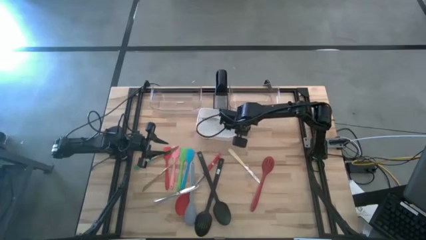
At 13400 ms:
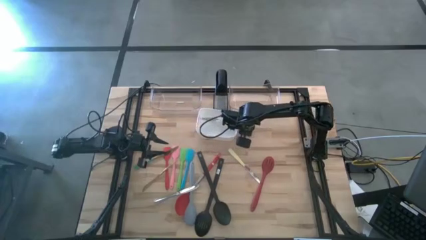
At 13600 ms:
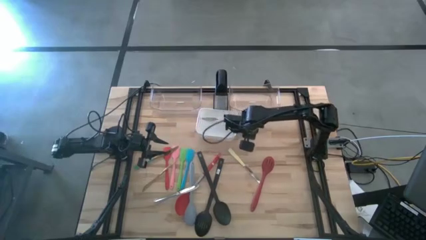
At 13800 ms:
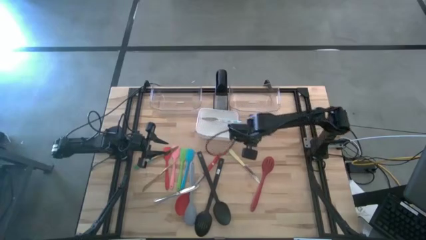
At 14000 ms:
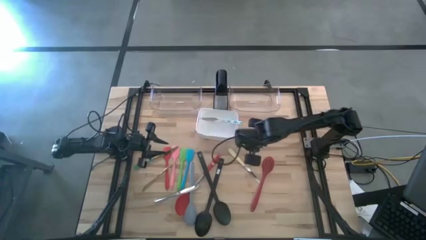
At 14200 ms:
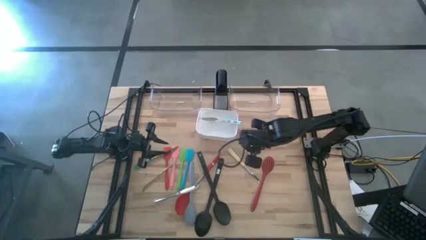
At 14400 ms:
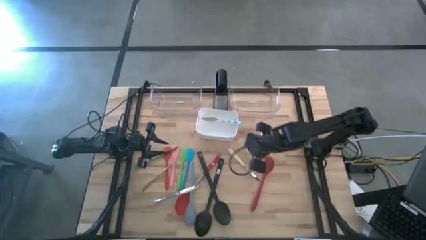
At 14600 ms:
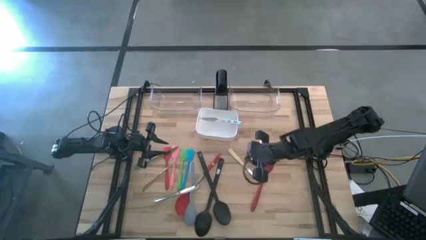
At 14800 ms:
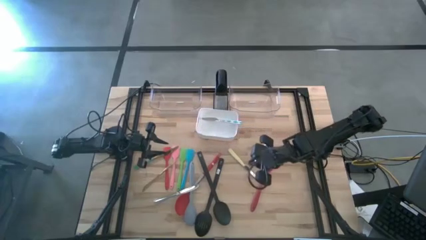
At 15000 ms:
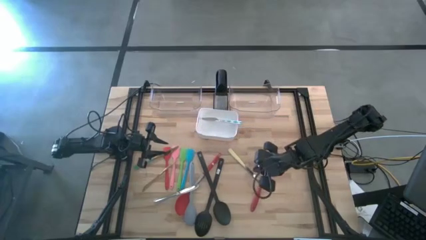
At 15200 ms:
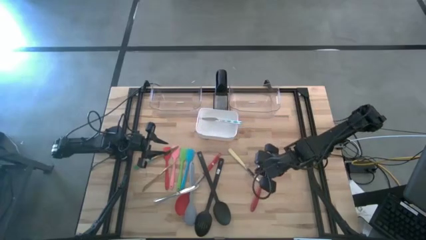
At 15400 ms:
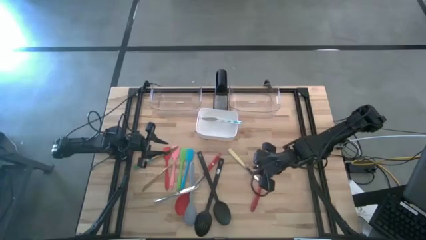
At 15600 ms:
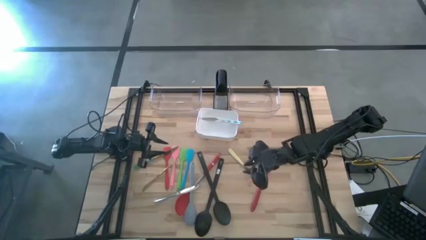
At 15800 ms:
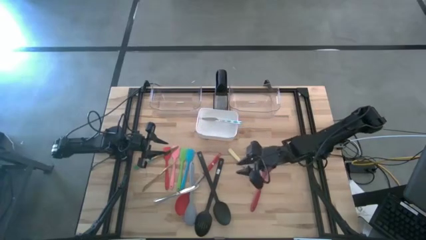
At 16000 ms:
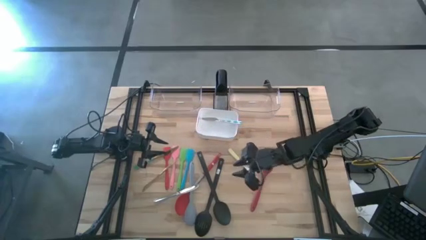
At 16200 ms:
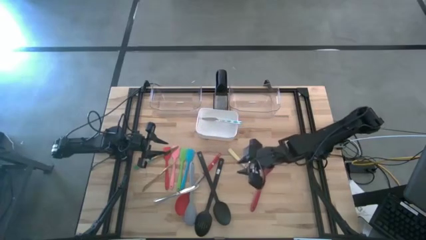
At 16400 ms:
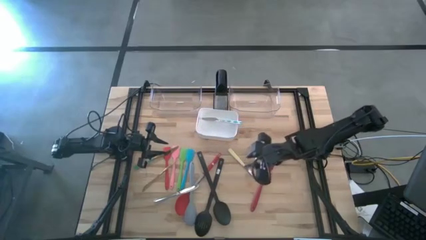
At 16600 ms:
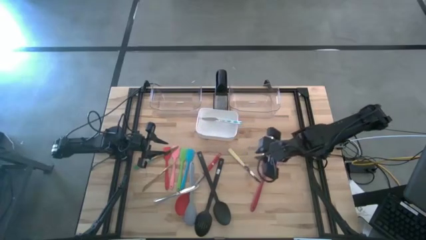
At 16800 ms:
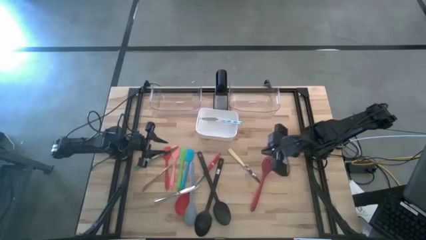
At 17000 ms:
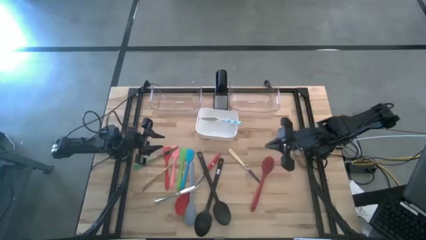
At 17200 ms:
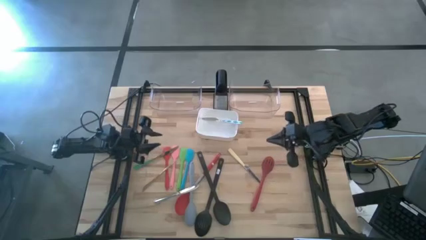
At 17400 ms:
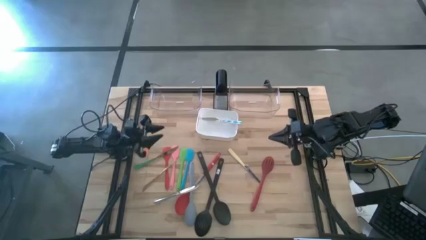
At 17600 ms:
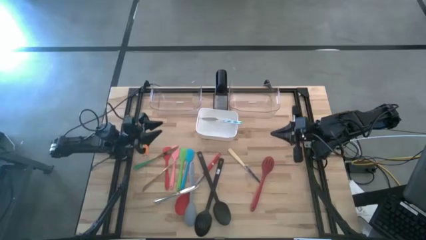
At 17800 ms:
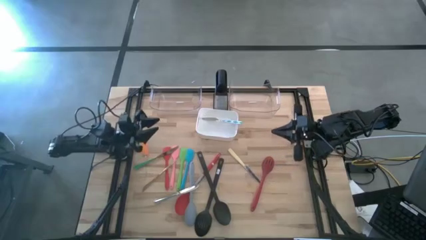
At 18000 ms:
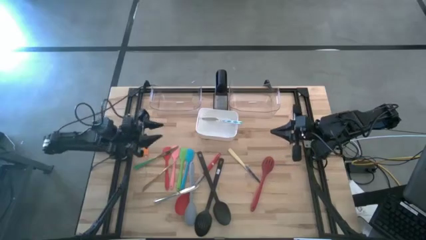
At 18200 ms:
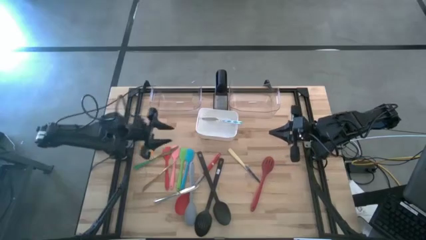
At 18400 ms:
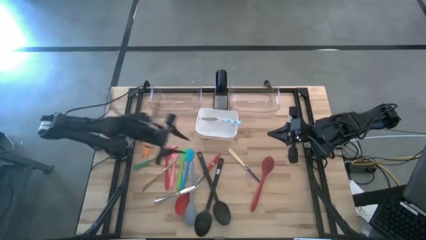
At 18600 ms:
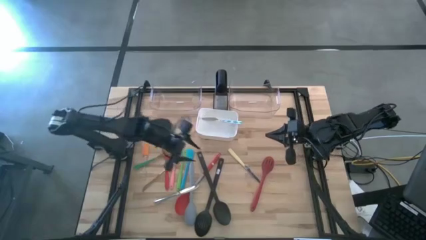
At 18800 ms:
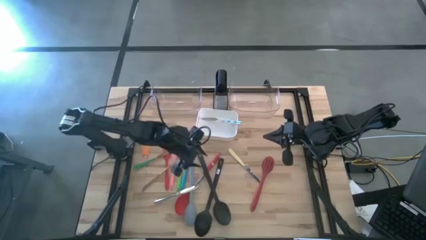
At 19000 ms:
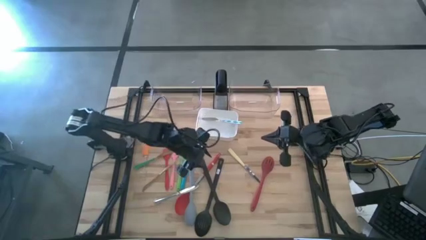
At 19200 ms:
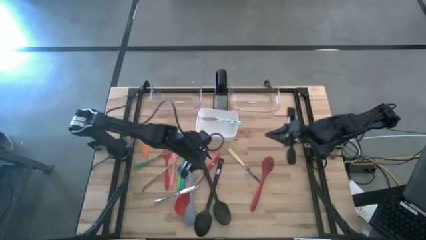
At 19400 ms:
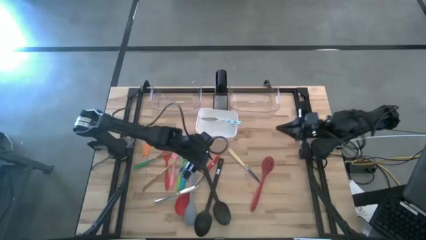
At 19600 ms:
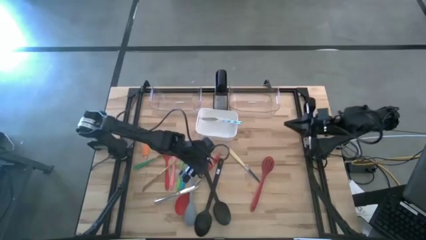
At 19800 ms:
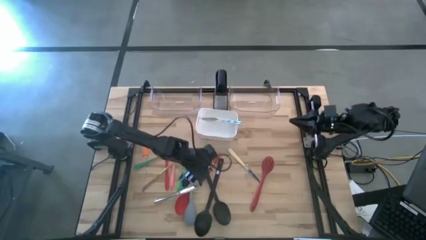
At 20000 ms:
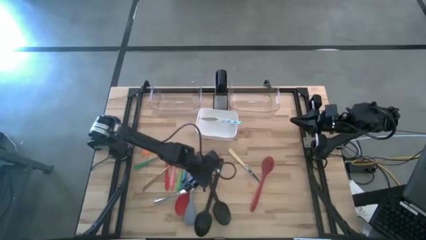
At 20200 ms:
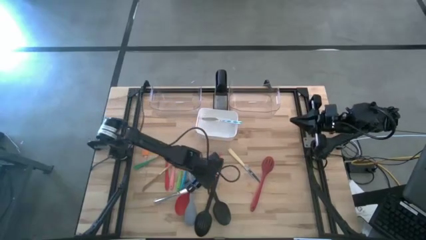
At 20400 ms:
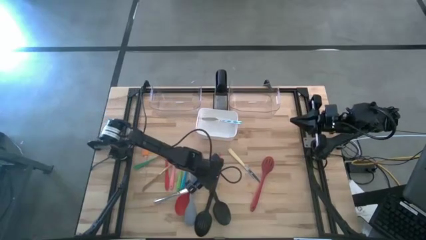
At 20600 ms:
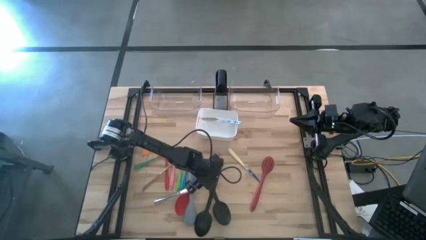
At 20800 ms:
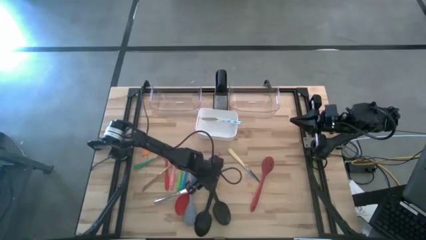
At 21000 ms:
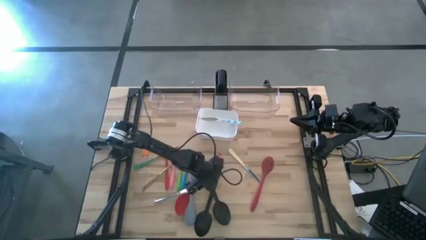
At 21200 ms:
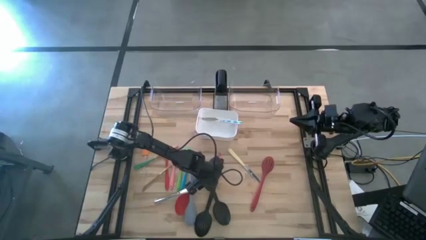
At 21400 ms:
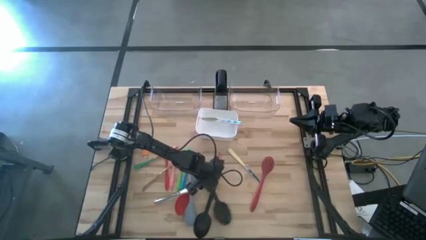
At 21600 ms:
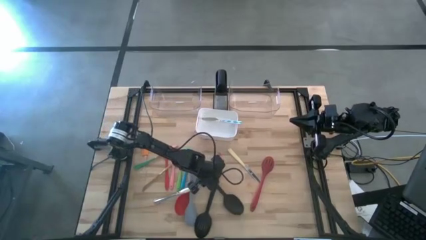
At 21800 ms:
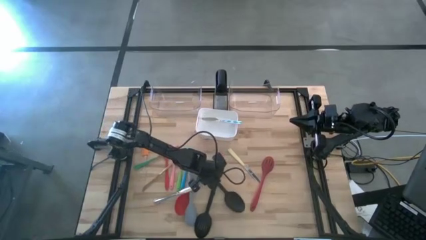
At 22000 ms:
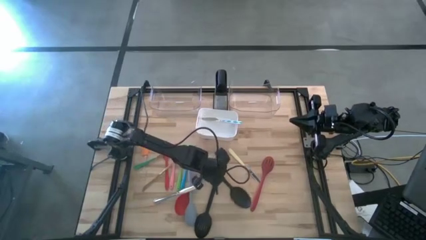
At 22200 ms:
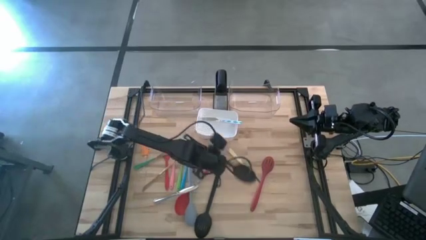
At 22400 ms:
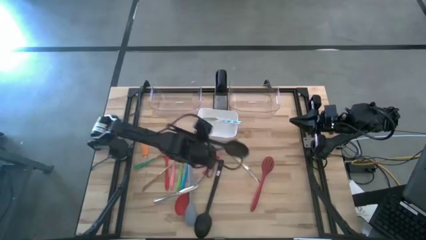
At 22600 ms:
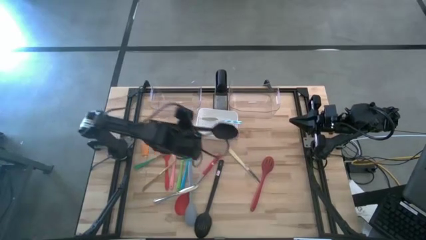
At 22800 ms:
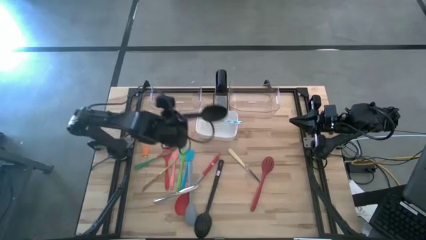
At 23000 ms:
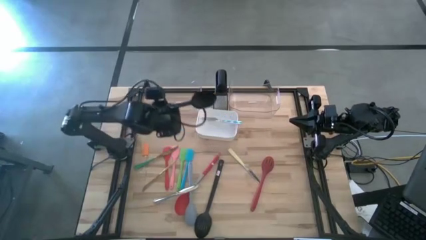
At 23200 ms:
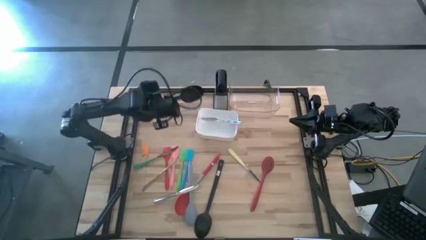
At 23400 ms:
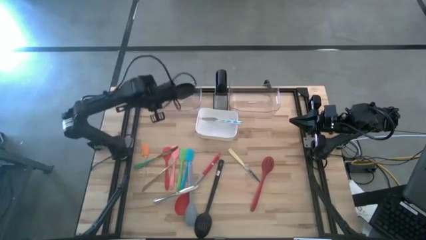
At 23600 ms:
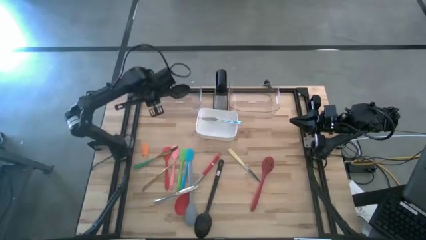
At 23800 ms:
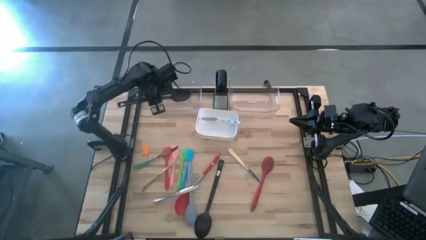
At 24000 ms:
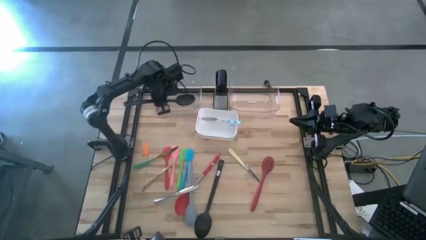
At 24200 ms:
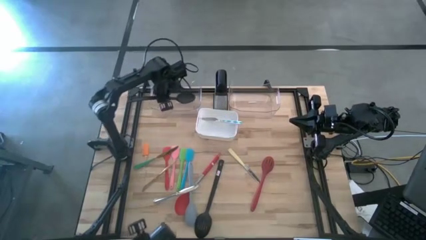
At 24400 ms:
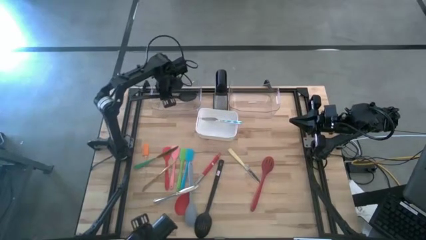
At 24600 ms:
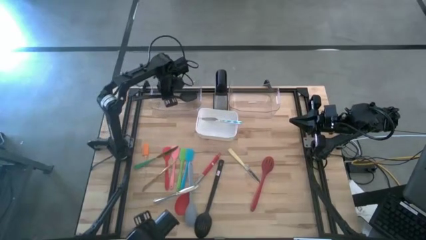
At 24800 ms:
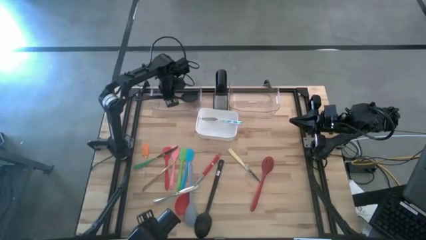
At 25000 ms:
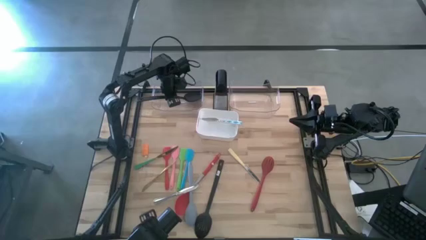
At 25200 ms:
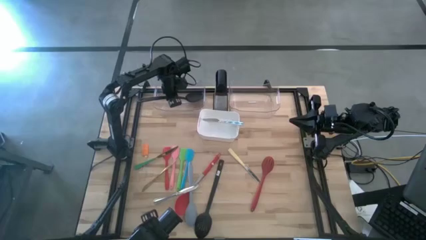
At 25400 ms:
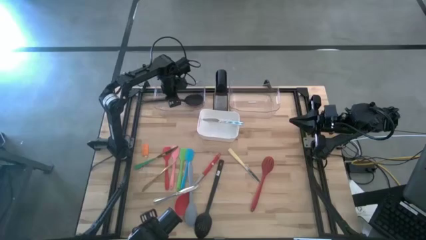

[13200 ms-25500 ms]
Task: Pick & Place Kitchen Items
Put the black serving spoon into the left transparent bin

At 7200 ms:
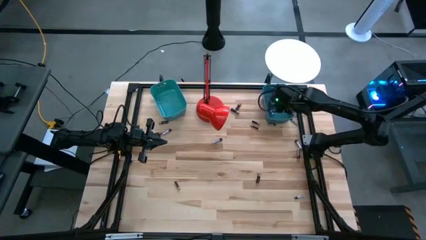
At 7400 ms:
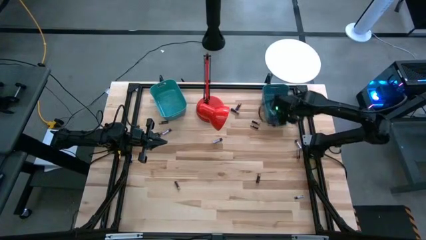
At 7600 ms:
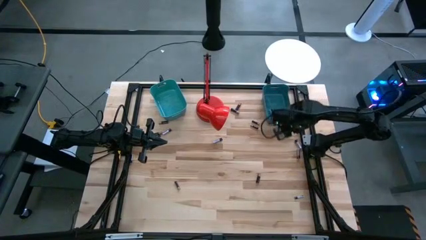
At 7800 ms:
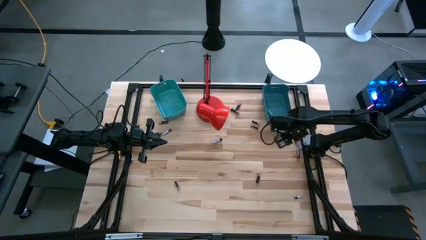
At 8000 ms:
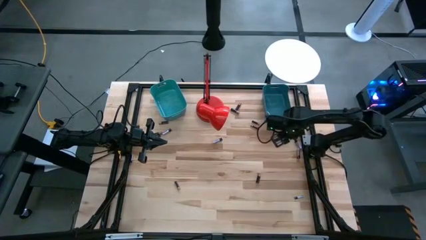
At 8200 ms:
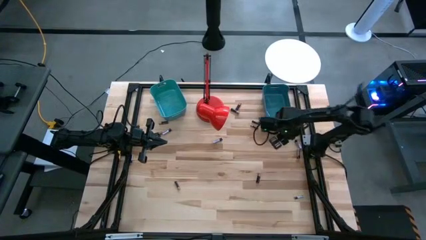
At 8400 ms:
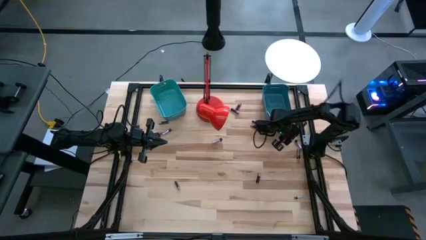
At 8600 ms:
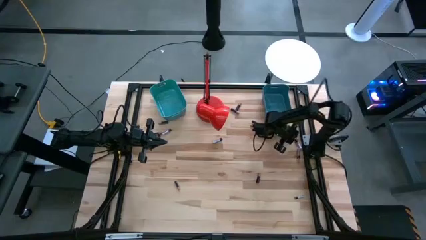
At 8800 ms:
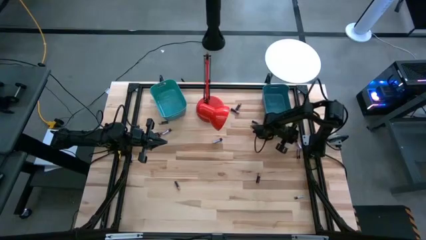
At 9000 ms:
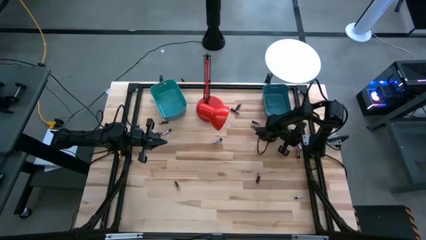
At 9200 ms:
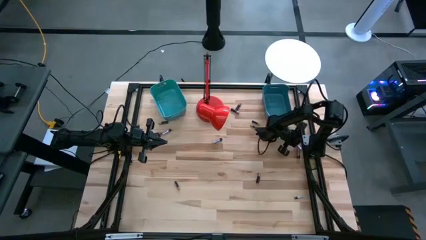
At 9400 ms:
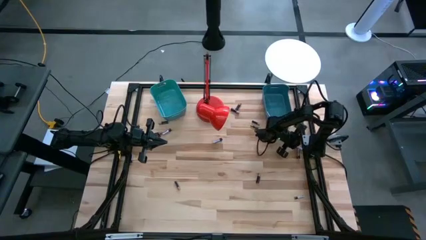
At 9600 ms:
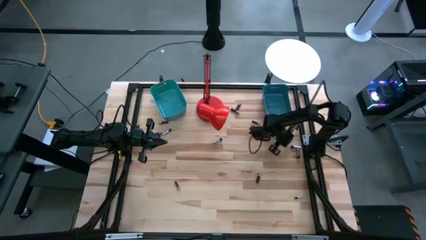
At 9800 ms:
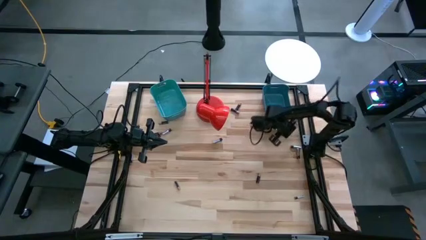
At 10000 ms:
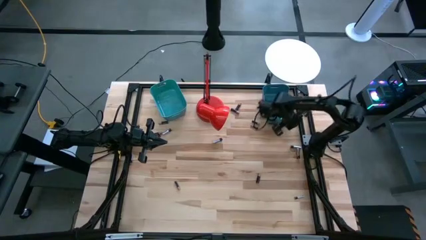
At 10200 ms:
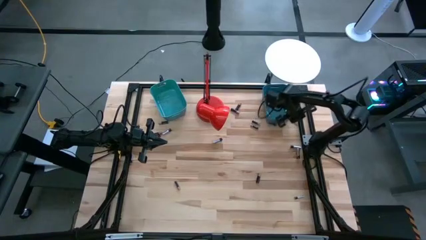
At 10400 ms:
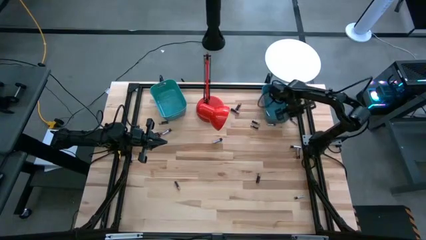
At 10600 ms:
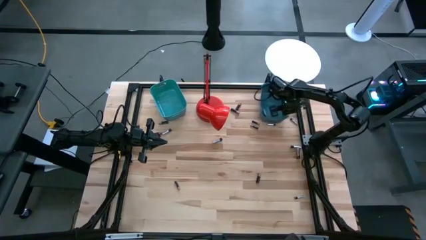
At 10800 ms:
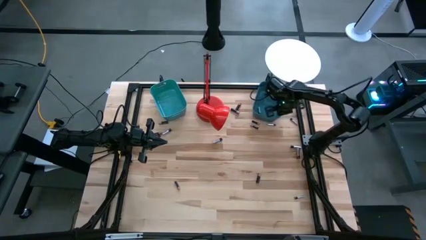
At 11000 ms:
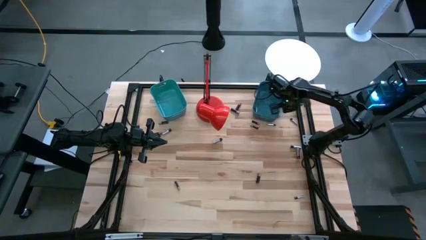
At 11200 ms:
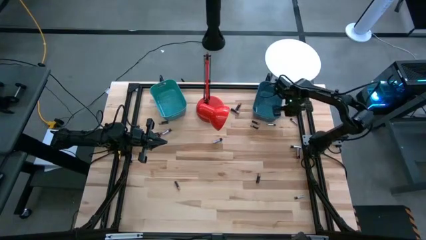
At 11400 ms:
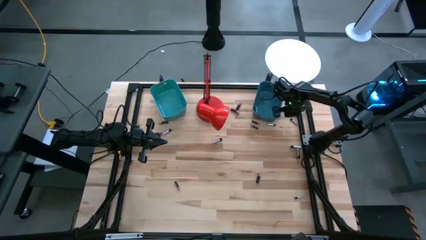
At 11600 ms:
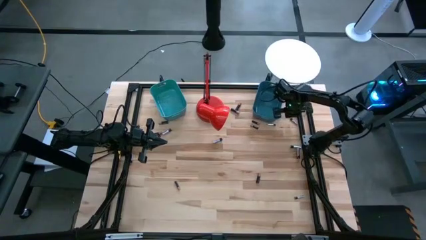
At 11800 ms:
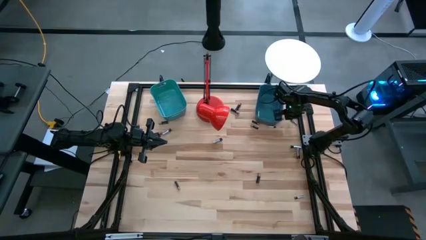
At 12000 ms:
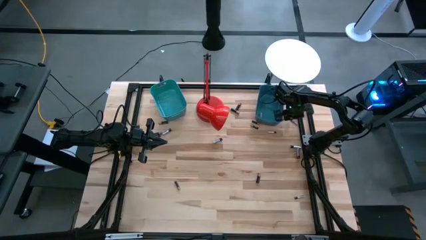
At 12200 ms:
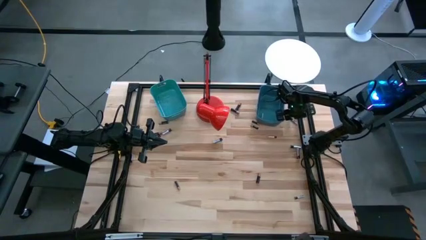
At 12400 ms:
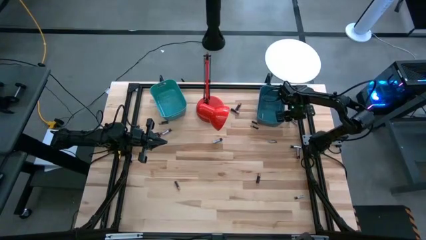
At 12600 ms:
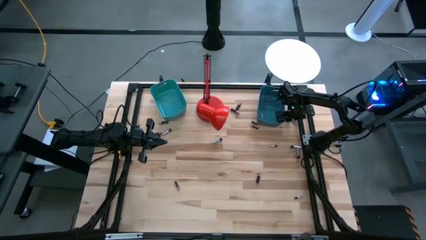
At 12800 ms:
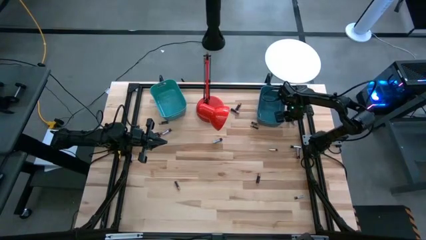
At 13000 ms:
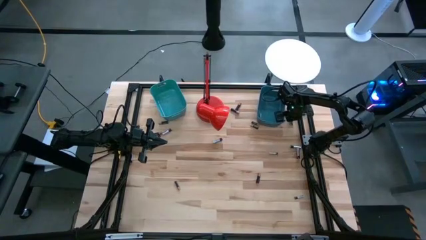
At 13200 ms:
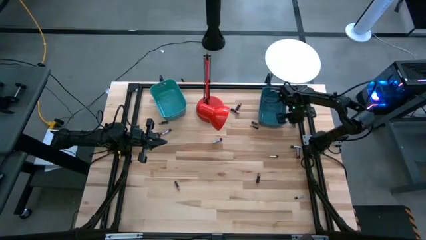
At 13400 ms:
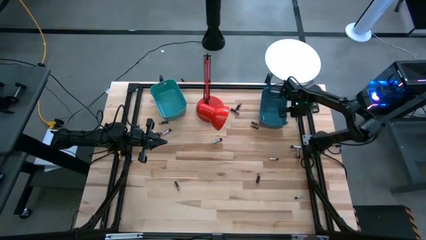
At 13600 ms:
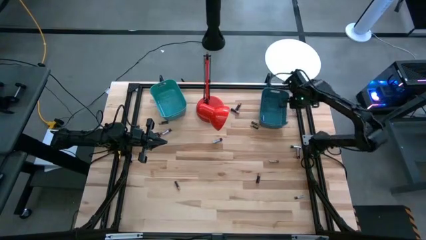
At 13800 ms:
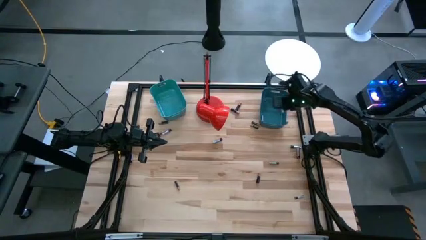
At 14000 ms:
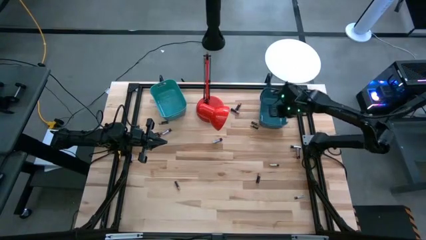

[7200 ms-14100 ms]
Task: Sort batteries
Put the silver battery into the blue bin
